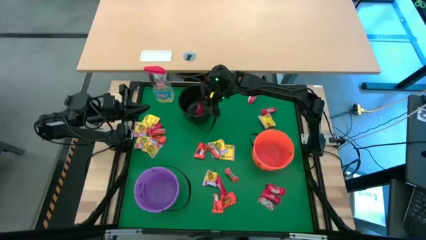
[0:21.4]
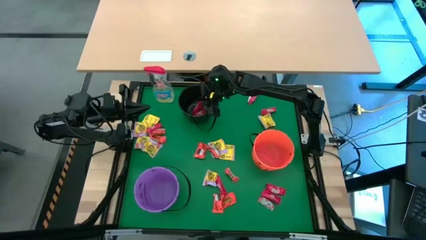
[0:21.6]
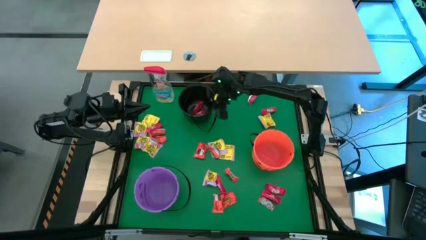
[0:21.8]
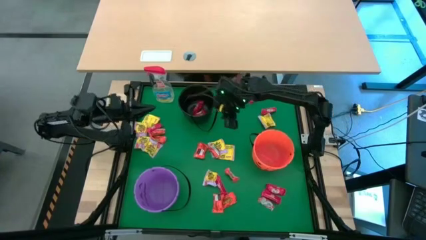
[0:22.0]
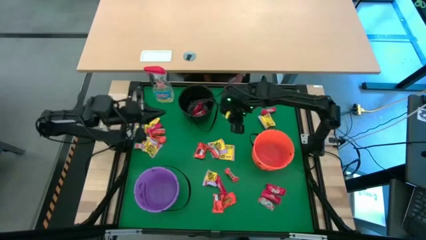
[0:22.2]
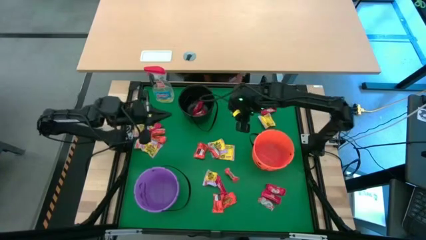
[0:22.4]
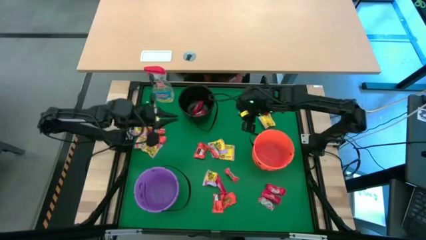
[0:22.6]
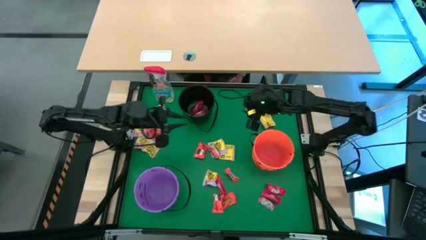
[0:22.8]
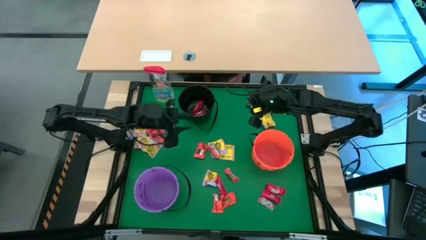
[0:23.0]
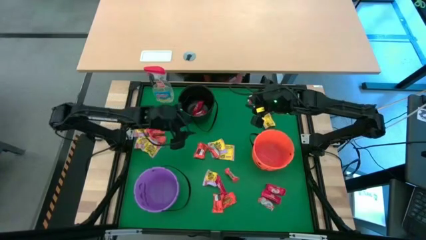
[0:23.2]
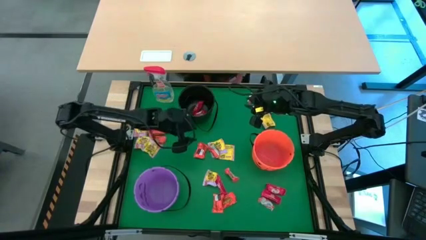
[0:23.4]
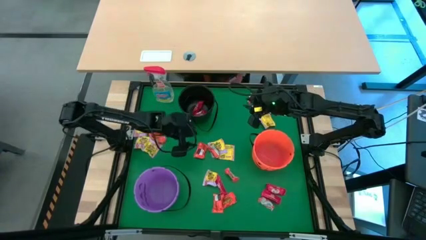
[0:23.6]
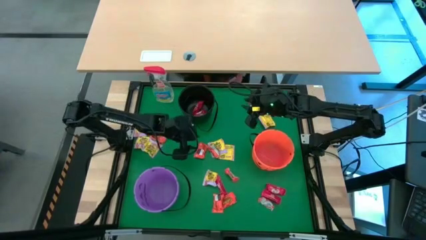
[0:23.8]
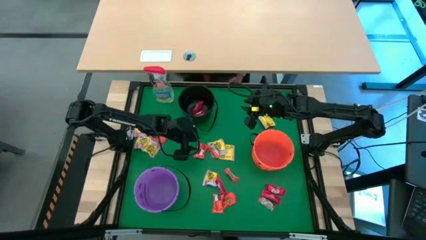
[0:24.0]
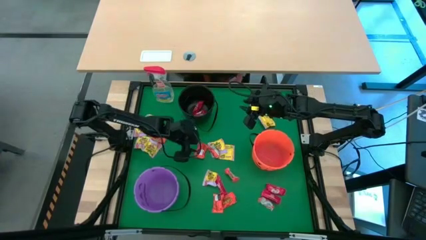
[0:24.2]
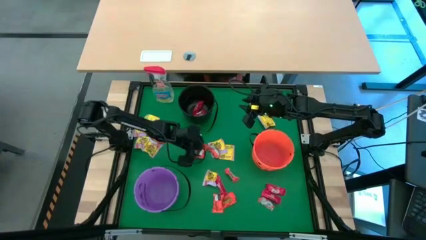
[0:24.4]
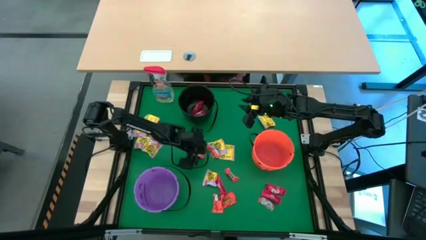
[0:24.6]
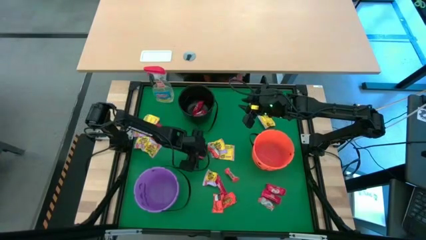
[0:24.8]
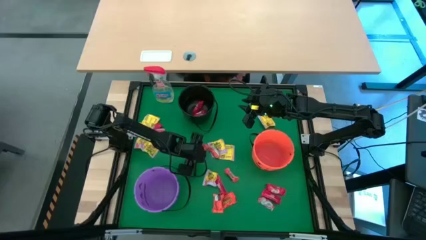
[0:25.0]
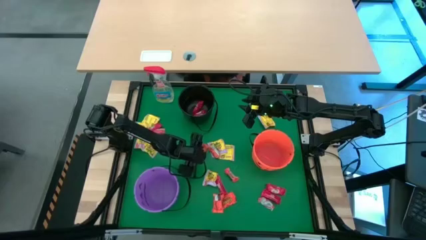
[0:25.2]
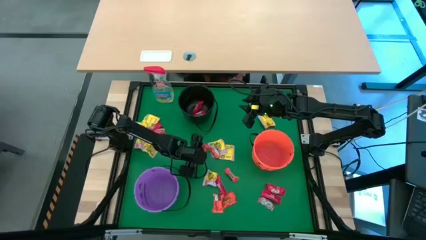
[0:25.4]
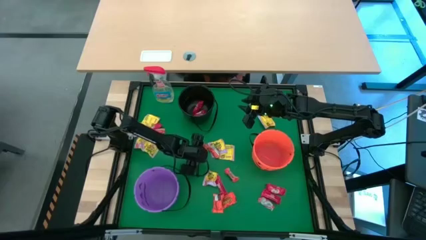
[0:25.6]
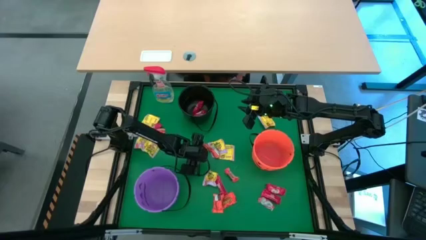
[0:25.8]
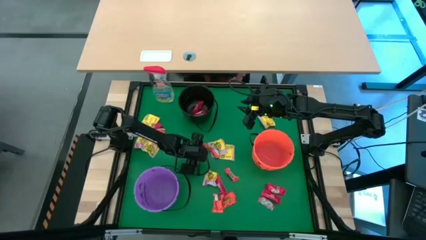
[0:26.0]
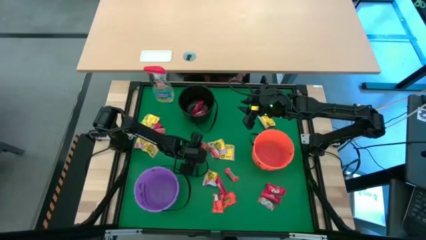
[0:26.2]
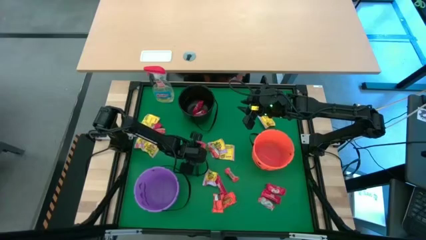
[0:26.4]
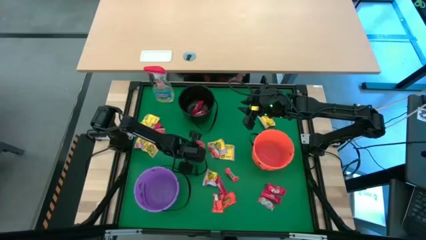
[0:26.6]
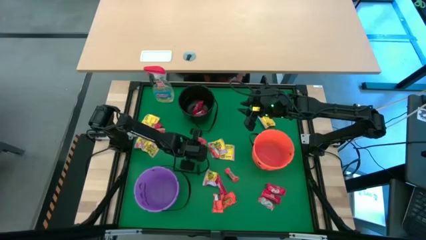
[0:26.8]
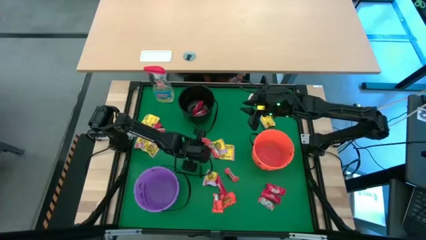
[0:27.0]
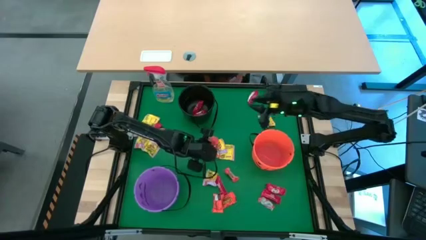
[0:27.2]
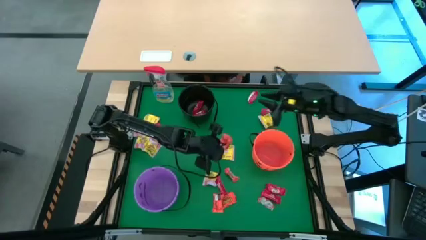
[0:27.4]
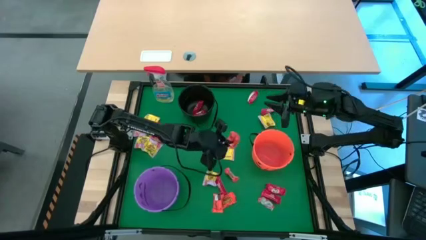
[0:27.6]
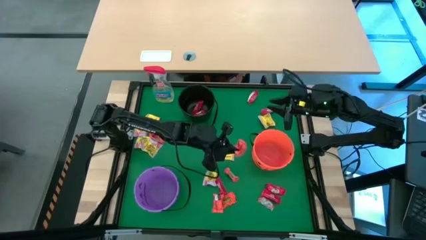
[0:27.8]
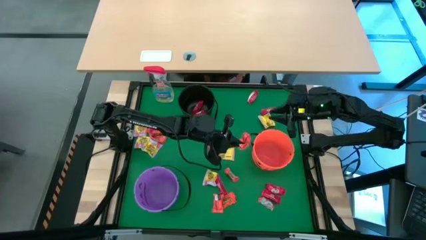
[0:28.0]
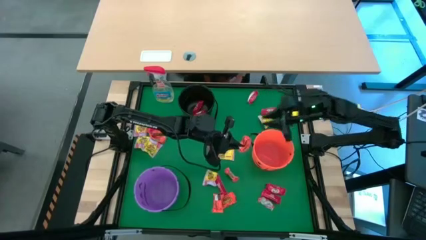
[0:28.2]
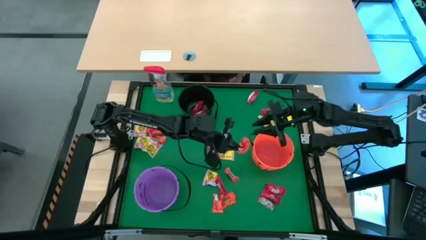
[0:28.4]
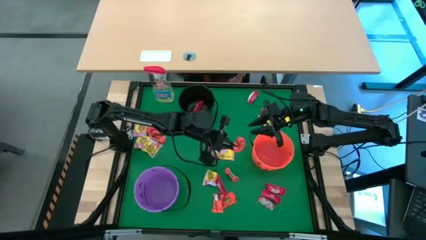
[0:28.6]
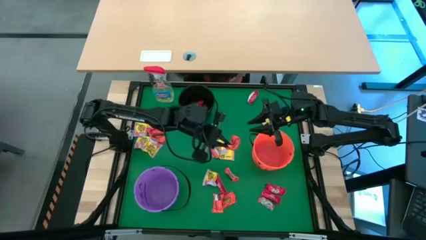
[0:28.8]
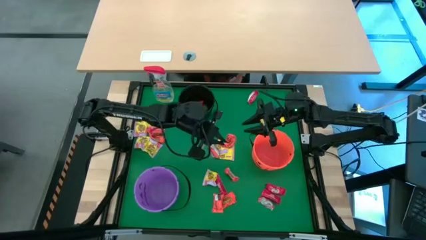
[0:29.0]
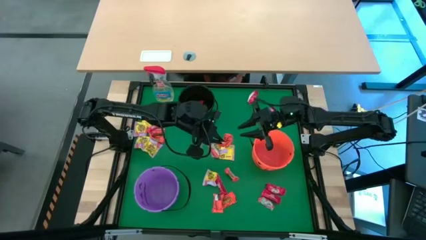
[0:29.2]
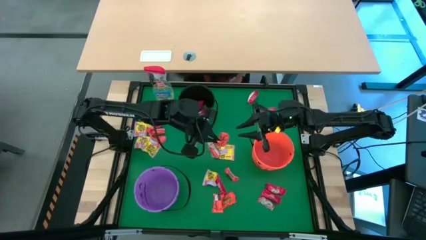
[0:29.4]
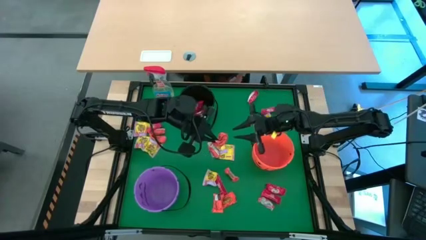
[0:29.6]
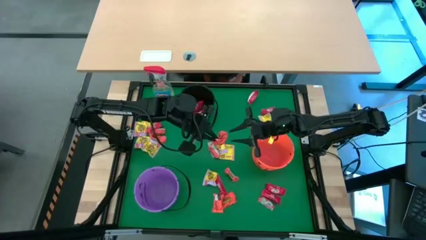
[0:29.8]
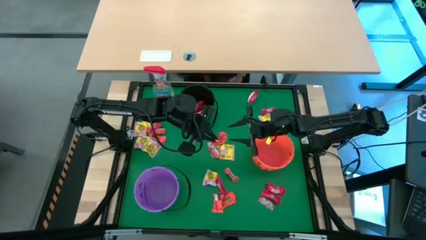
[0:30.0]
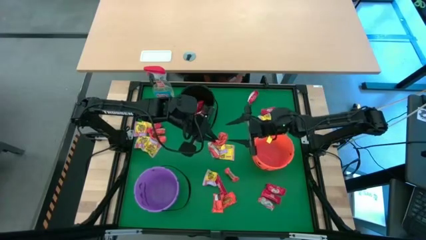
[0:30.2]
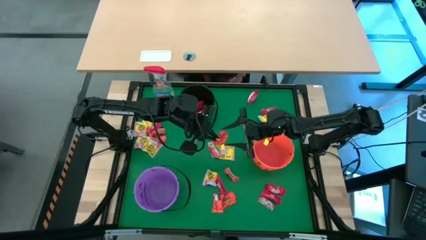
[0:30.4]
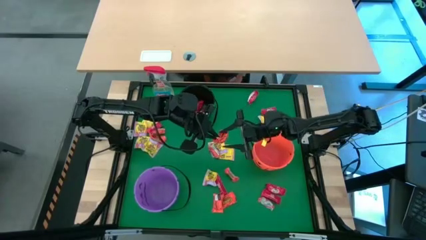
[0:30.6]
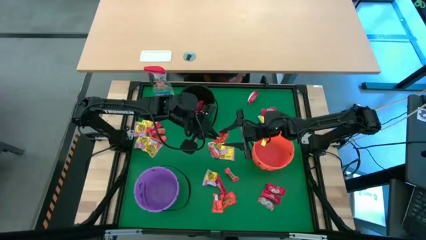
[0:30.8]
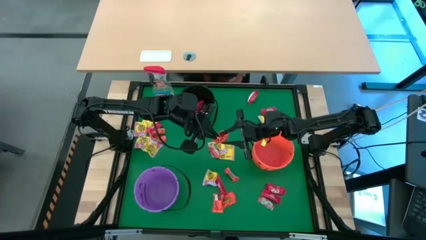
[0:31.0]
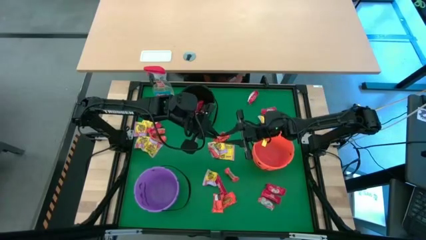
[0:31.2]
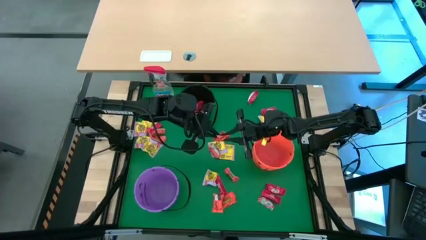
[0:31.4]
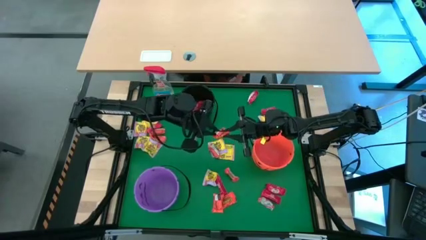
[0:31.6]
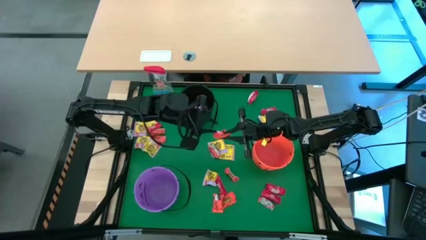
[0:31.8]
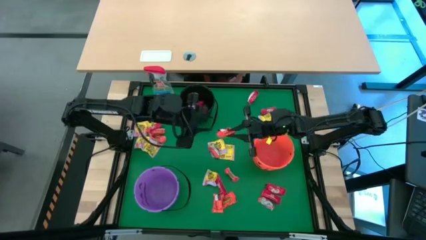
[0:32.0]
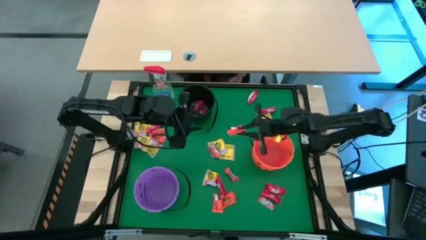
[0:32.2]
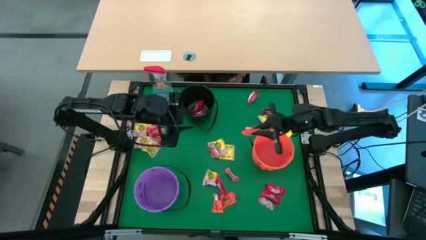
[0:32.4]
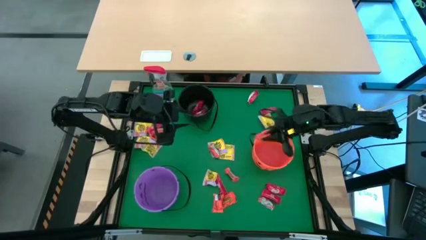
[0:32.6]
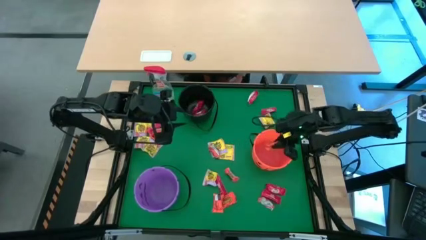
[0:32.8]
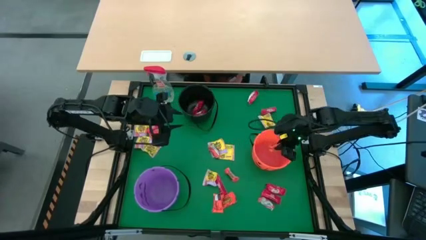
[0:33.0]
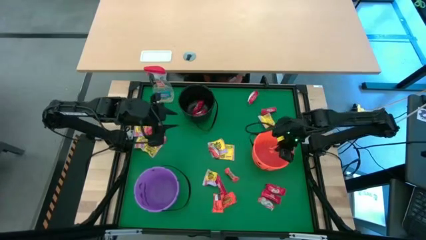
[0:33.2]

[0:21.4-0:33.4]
Task: Sort candy
Put the orange candy into the orange bucket
